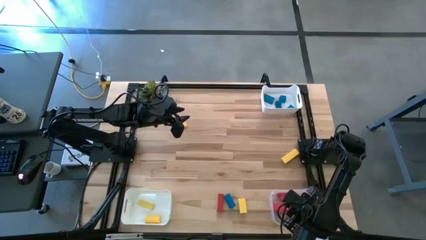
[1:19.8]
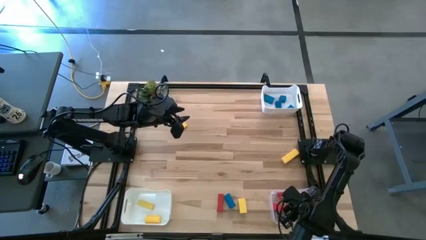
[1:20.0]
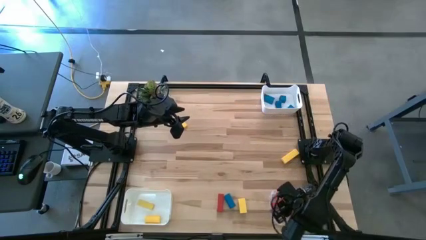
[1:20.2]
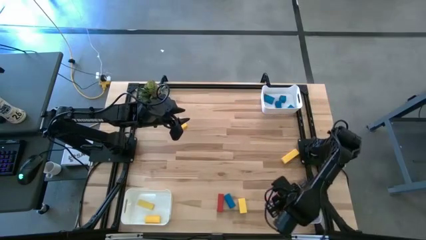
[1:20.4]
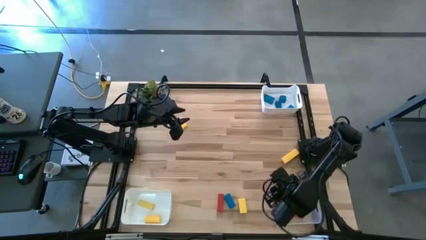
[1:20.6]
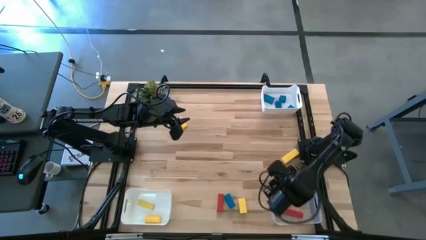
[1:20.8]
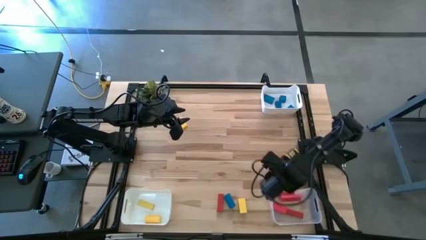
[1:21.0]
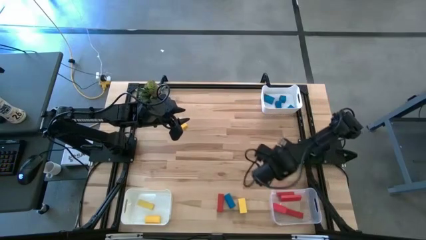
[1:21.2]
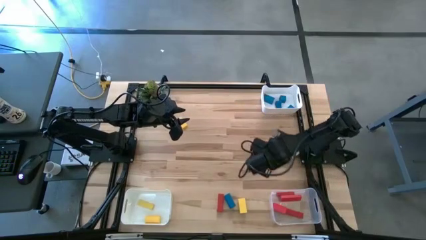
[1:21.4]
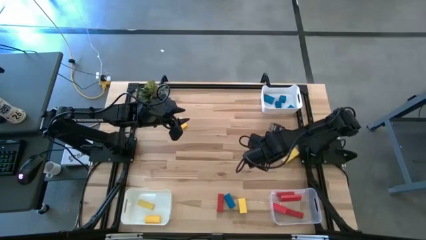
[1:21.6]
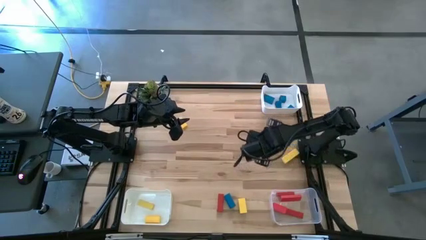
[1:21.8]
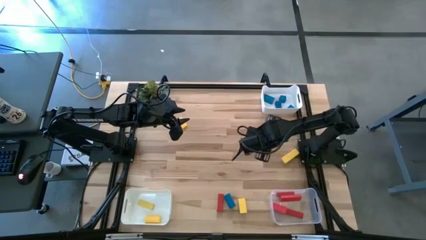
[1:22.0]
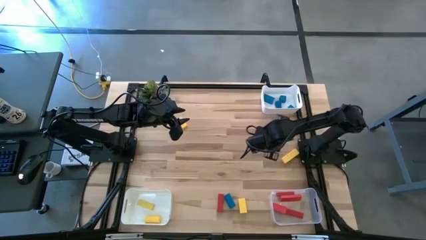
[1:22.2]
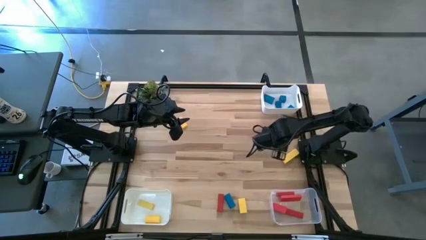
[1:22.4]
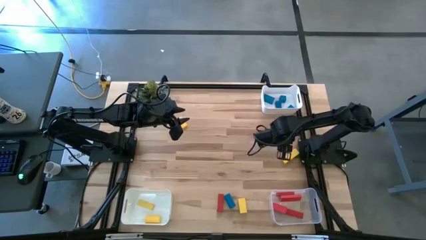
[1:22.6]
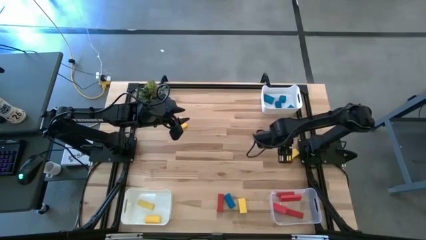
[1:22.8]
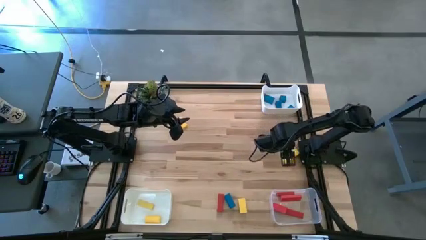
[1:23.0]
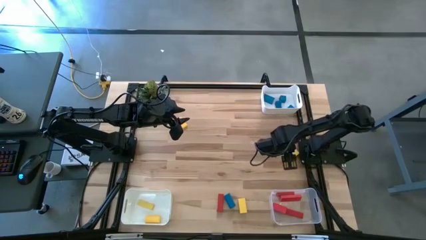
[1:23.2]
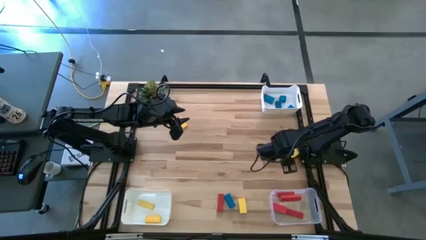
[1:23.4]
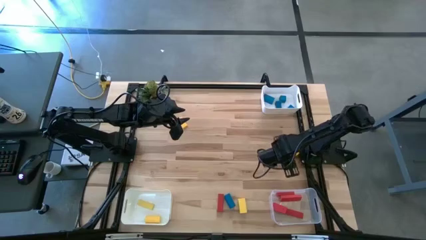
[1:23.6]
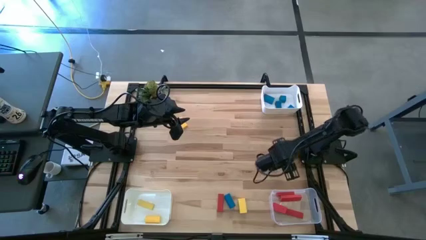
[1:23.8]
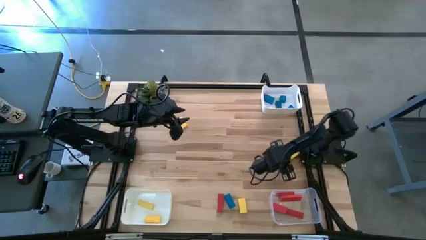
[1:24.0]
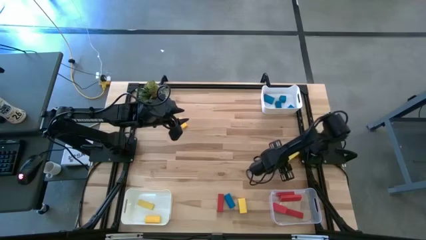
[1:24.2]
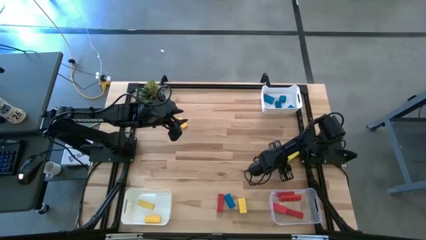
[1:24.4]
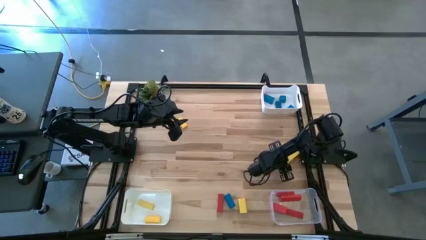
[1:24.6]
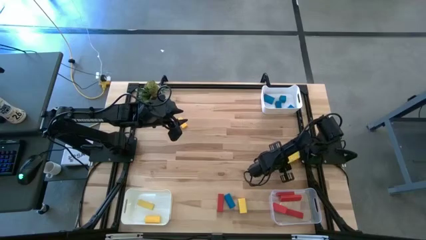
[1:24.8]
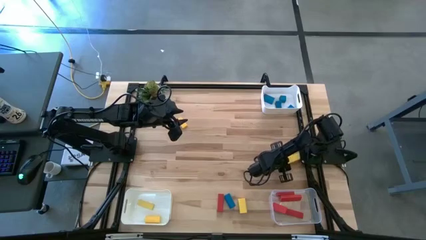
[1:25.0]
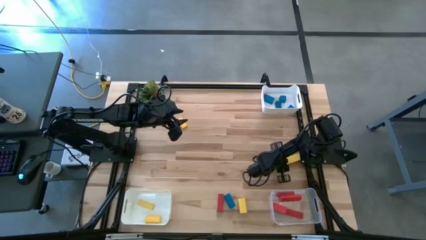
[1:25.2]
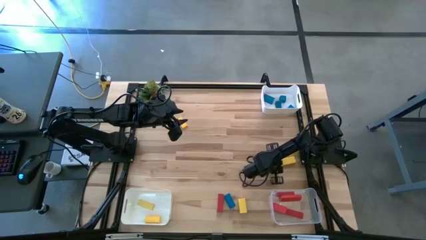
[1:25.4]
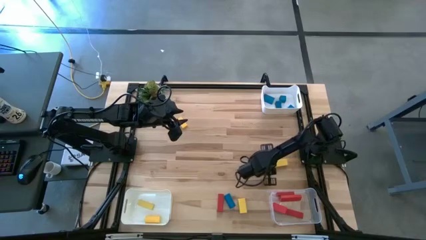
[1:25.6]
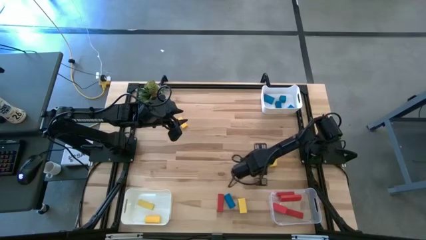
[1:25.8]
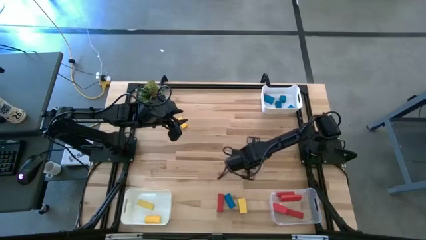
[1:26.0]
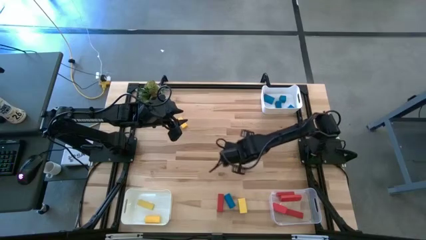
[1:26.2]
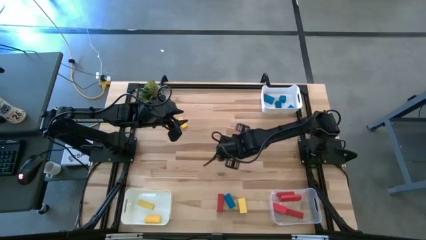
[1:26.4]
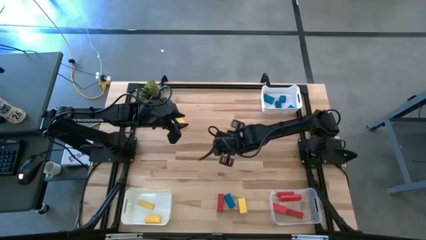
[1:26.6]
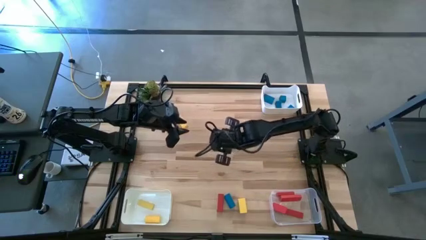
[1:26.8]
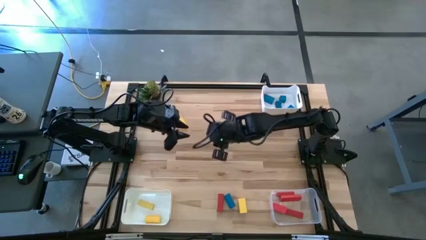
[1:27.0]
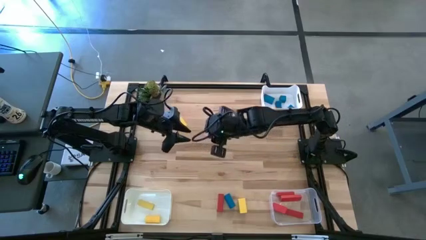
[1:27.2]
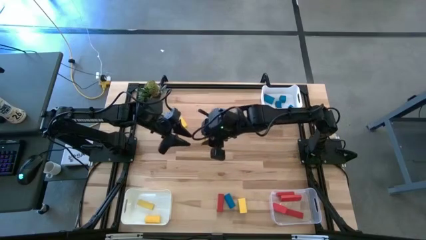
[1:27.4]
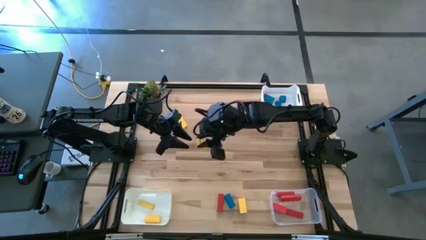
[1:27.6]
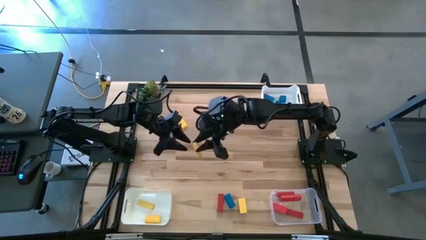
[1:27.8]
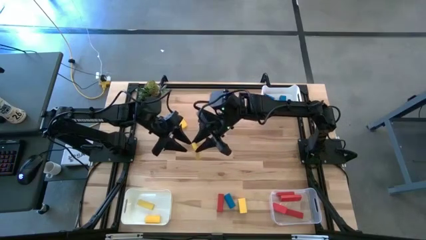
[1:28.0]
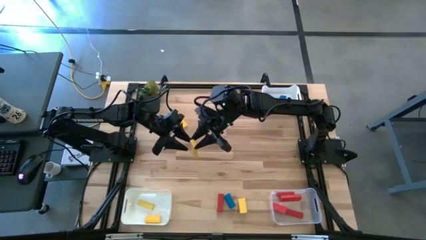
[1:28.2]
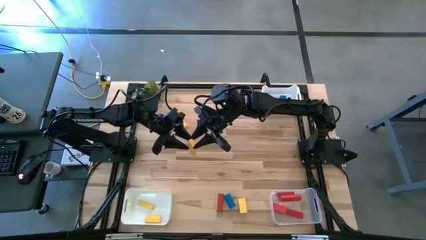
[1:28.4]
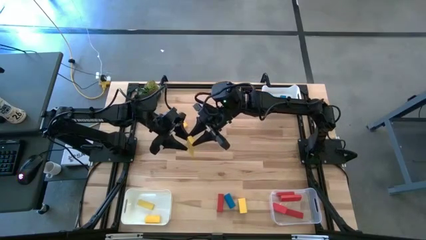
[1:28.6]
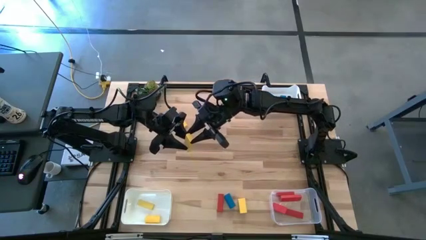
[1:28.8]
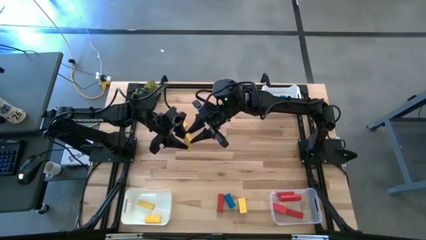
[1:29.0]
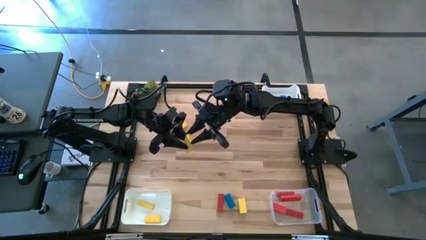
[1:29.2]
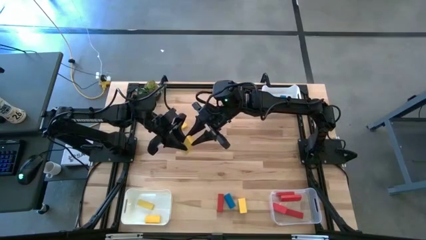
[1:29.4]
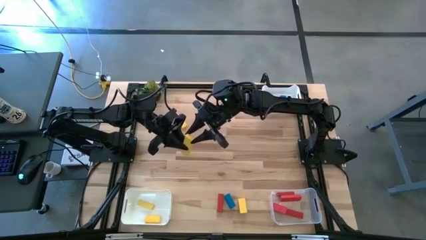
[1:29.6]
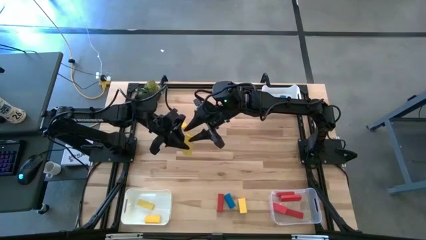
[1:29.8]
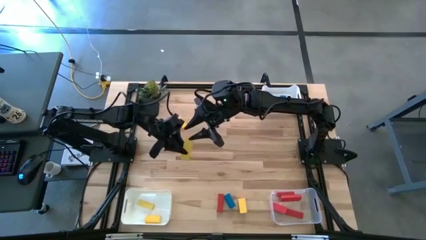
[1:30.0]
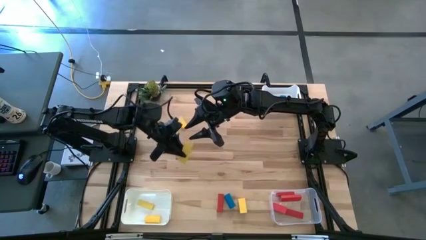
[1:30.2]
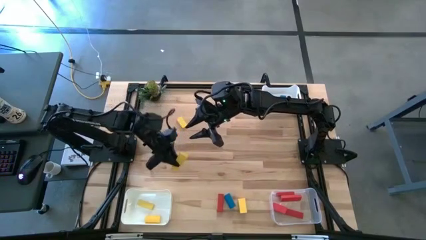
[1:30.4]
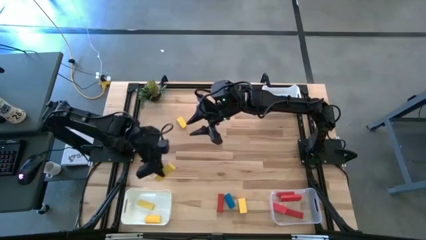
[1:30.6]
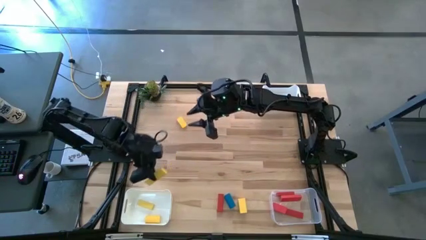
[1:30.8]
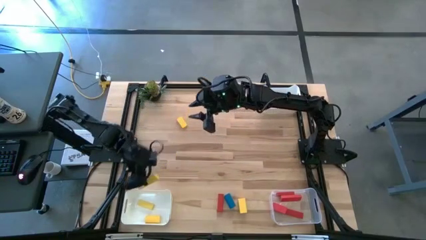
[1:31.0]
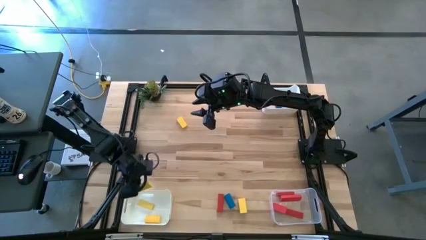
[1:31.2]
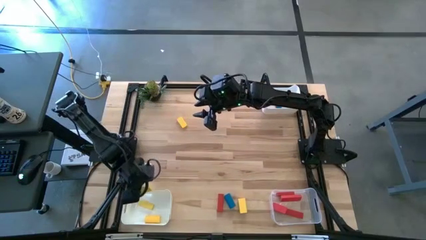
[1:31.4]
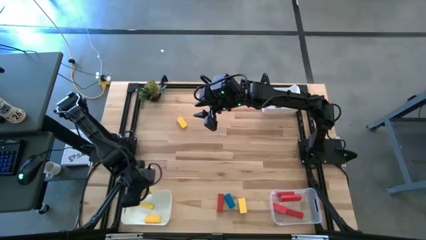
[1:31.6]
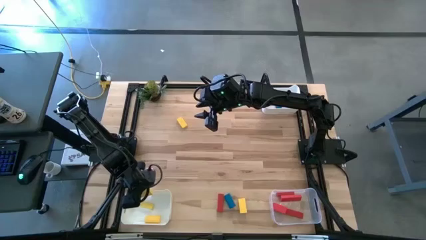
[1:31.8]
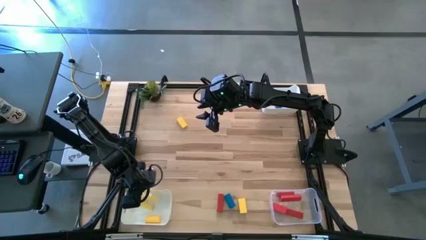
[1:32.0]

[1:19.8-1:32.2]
Task: Sort & place blocks by color
Put the yellow block into the bottom white bin
